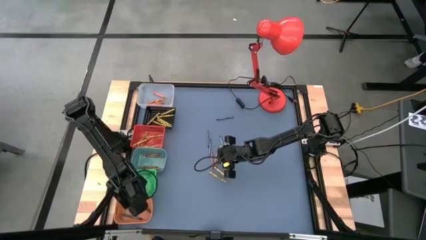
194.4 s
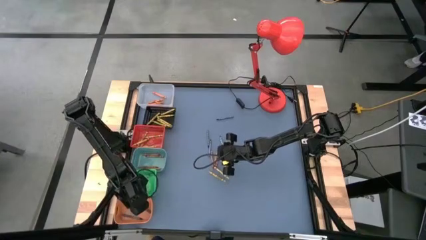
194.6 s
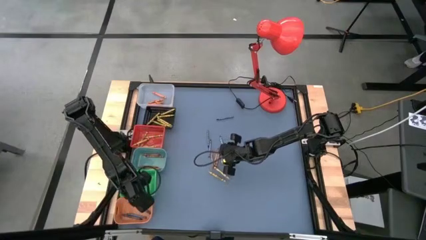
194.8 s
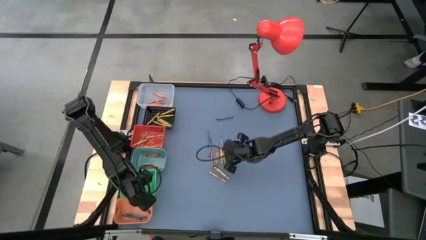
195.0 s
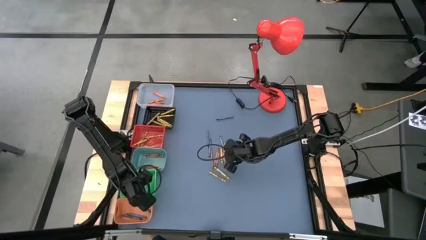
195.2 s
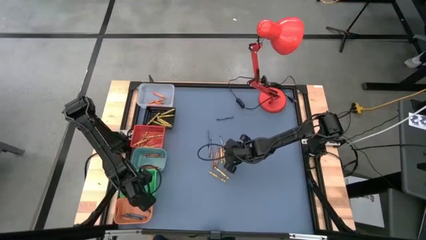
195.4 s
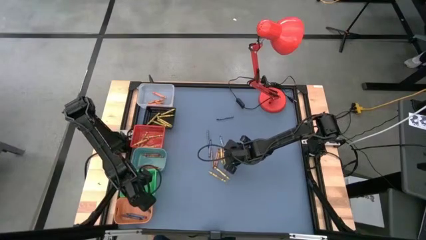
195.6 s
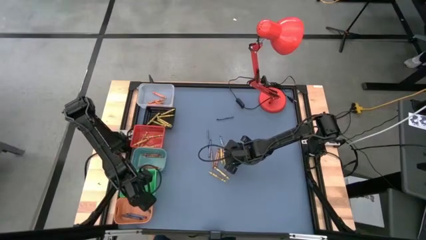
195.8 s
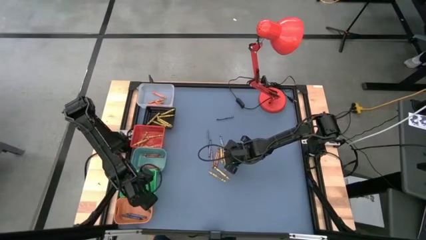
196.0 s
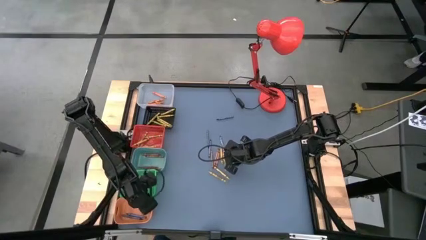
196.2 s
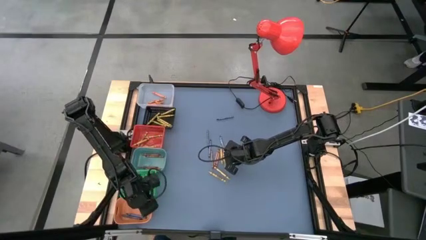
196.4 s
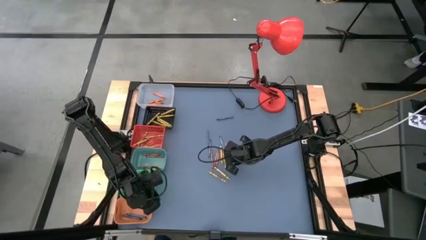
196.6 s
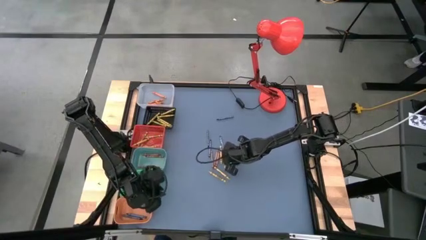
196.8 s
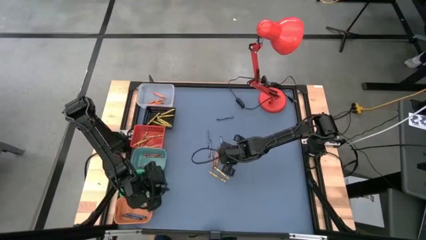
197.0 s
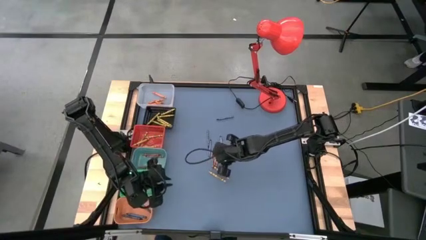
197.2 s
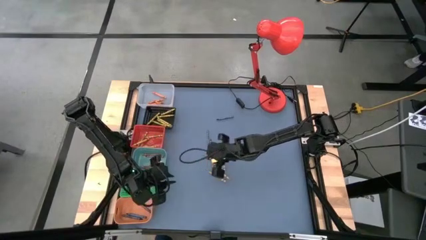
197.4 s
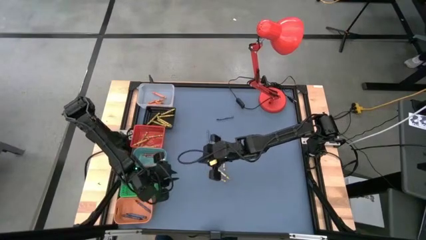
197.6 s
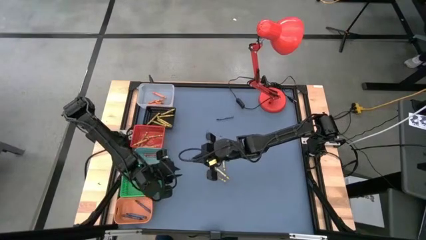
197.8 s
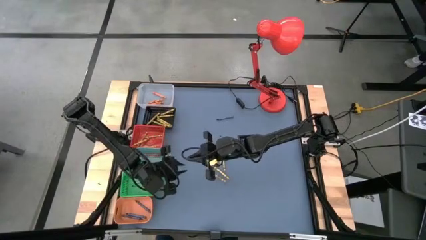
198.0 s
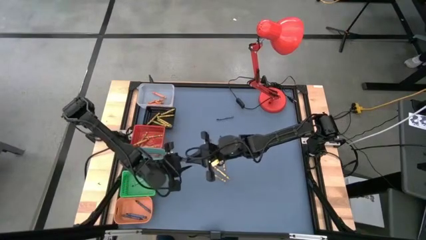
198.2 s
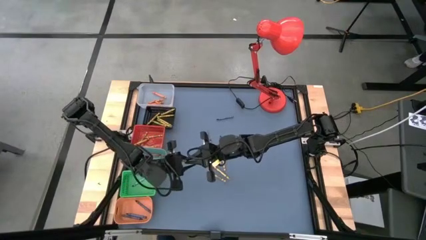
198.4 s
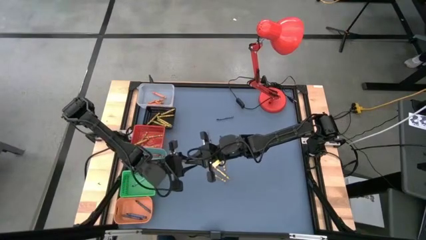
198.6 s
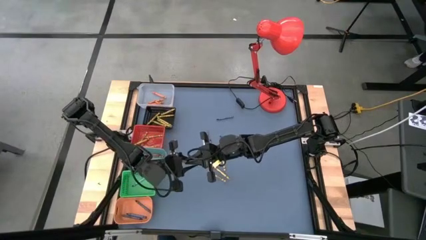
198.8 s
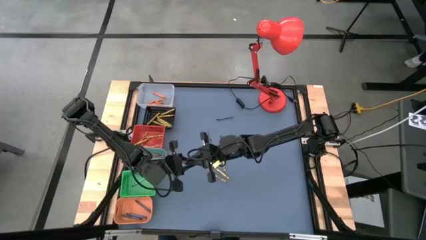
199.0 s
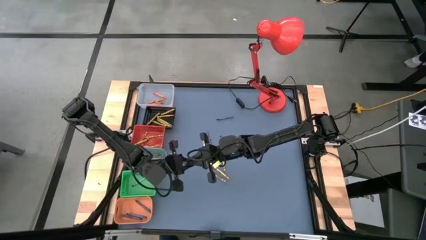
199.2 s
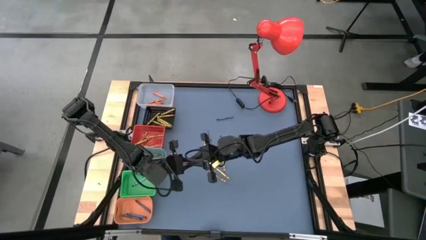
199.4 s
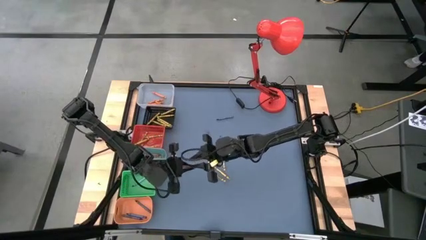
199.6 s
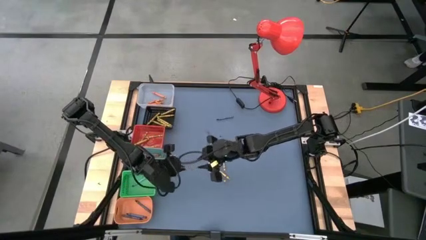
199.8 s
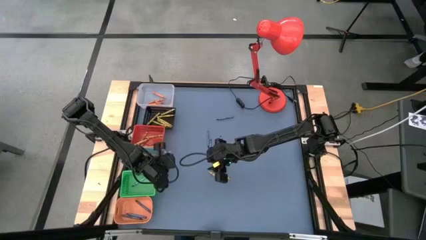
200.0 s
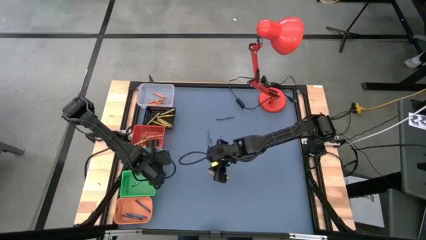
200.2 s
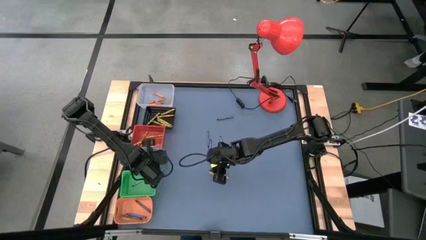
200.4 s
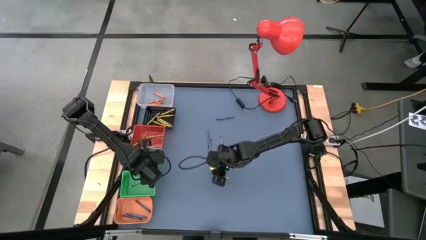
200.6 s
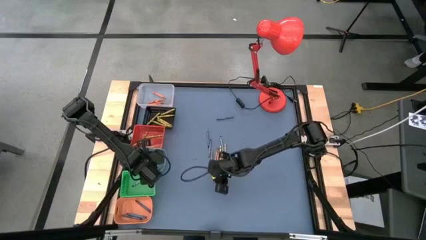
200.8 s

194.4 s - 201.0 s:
Task: Sort crayons
Put the brown crayon into the blue bin

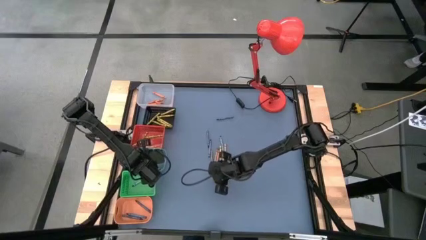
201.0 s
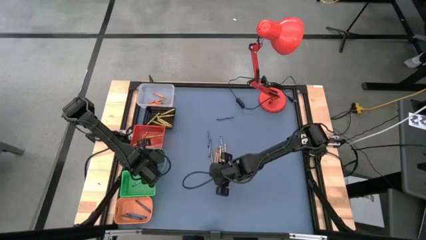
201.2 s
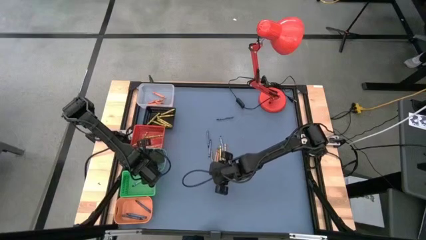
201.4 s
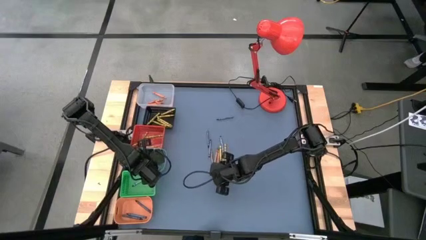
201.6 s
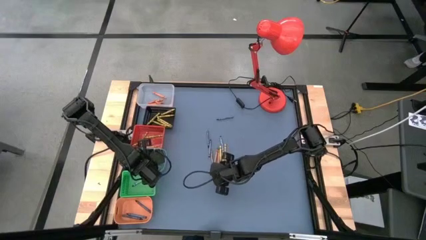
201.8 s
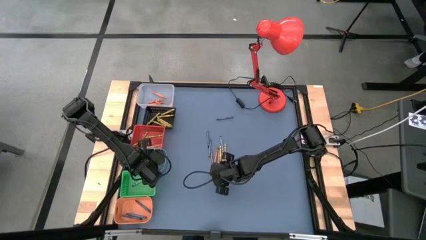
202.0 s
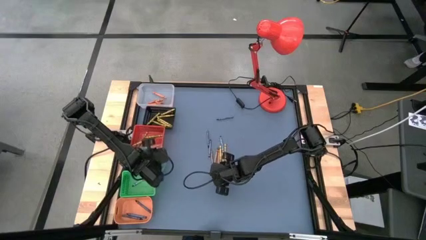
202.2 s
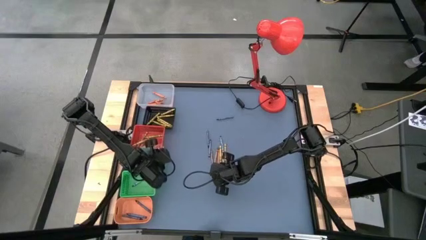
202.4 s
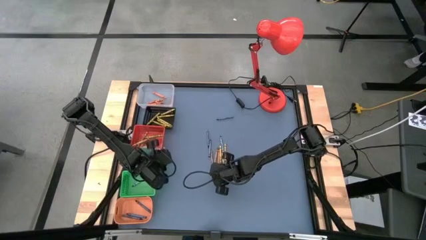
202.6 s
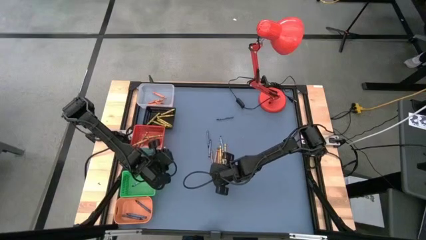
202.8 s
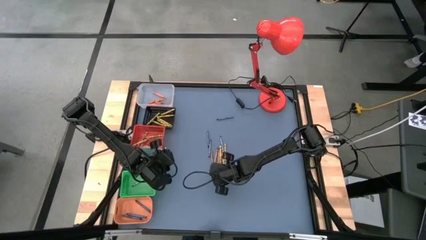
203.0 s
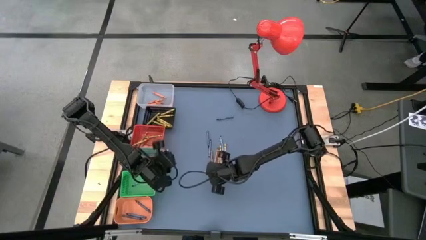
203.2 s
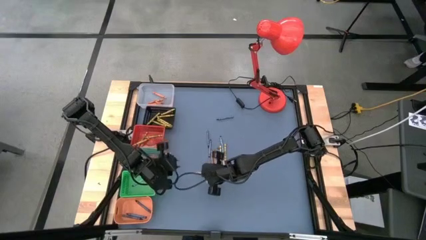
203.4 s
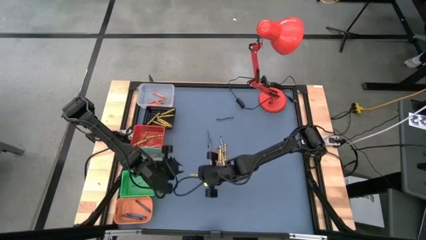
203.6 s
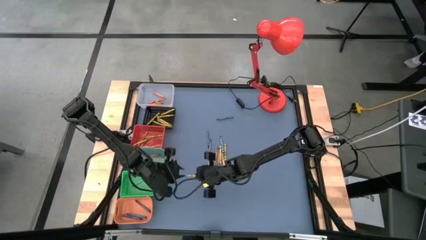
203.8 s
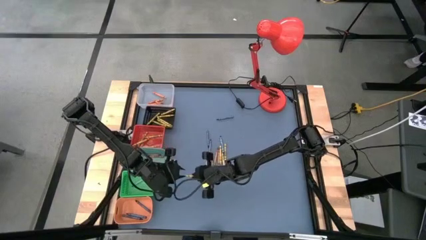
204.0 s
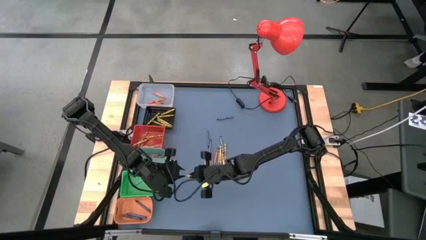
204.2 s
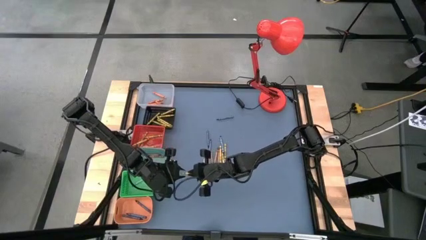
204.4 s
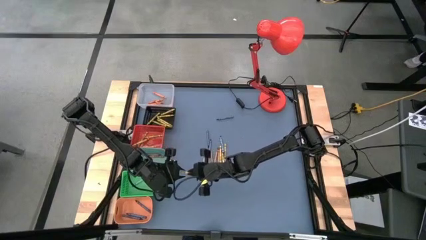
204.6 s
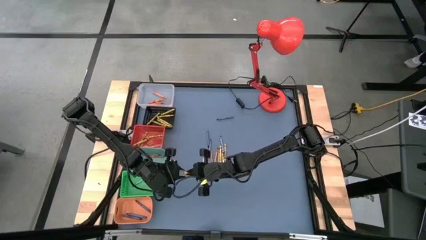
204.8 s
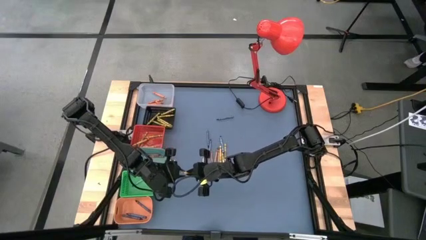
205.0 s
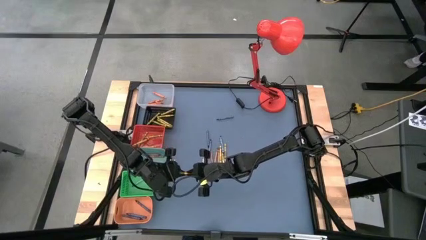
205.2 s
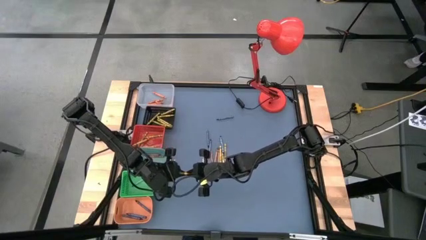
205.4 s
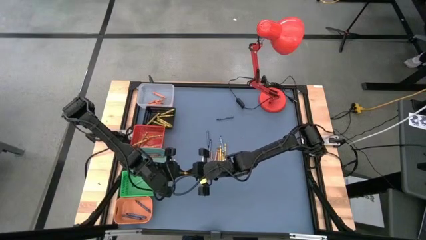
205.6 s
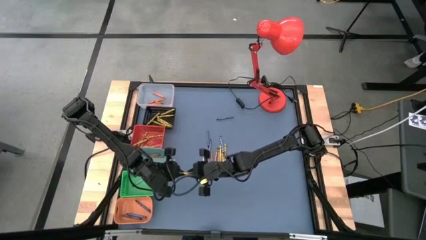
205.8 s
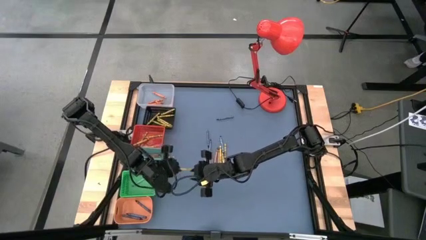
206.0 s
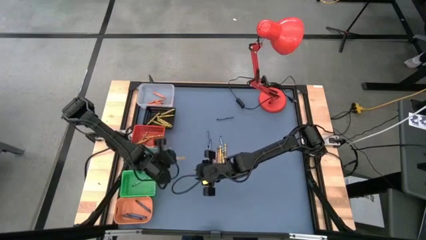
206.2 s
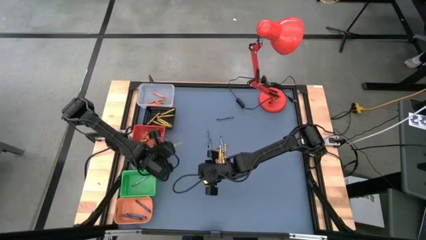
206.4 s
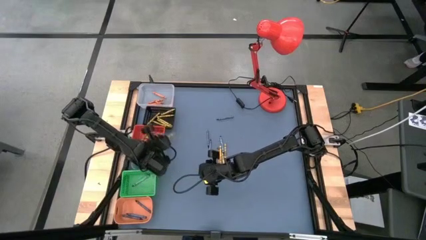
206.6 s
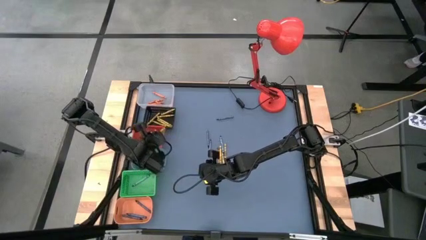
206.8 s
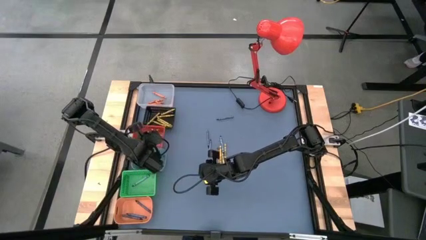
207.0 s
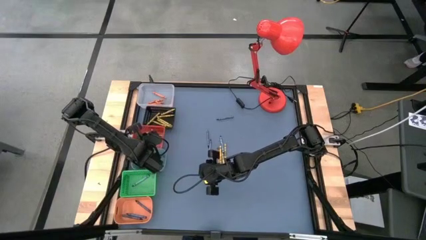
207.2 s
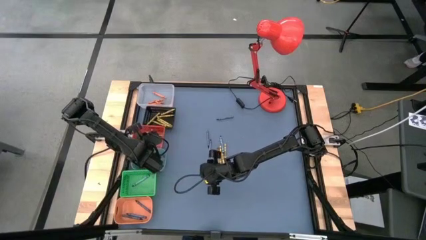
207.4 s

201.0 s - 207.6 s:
Put the yellow crayon into the orange bin

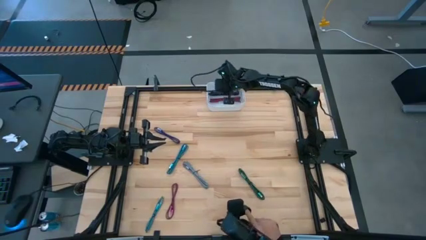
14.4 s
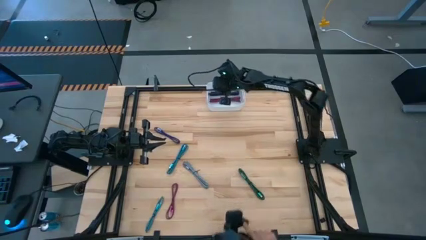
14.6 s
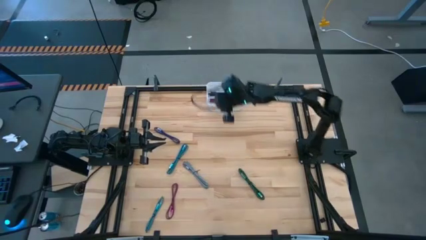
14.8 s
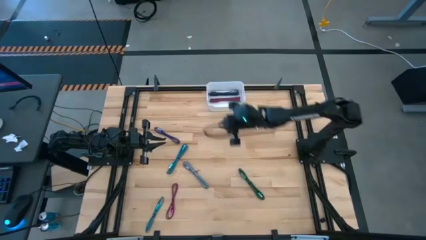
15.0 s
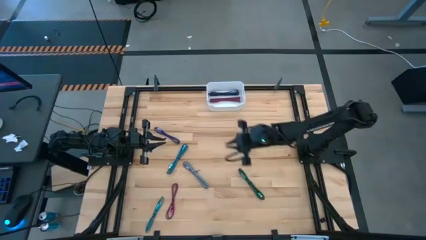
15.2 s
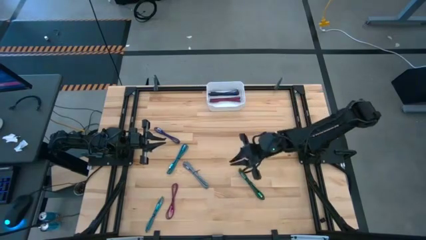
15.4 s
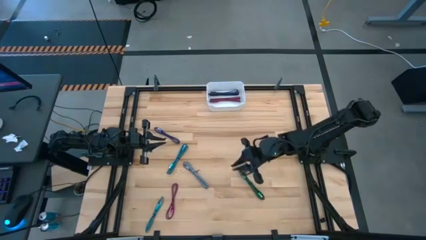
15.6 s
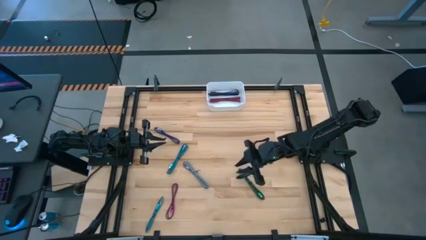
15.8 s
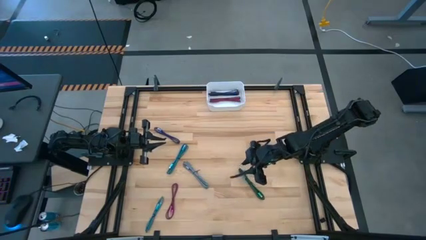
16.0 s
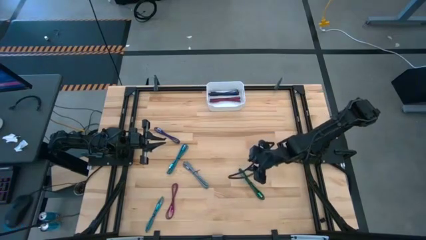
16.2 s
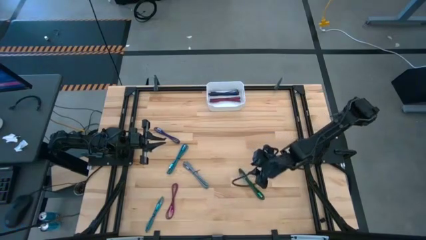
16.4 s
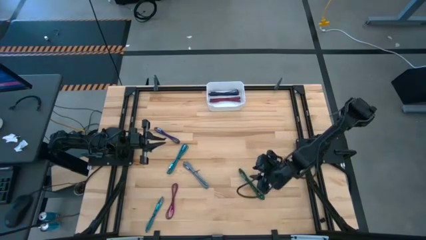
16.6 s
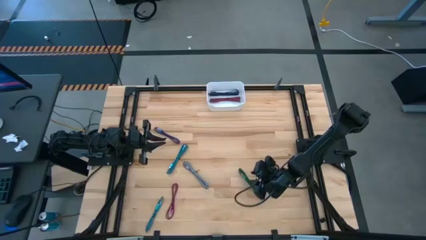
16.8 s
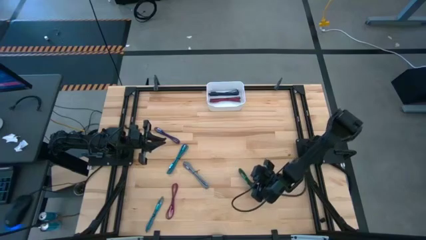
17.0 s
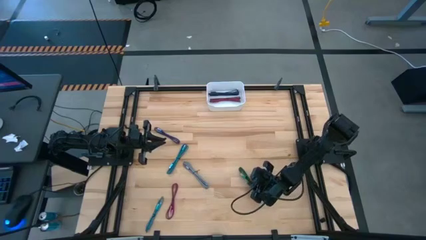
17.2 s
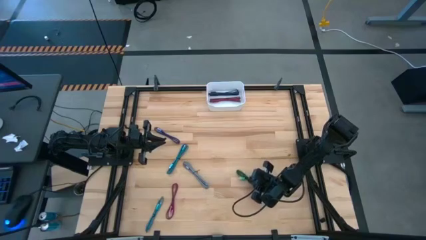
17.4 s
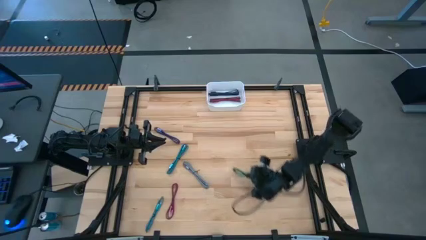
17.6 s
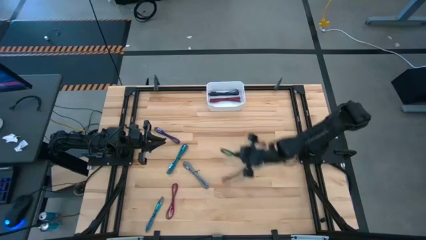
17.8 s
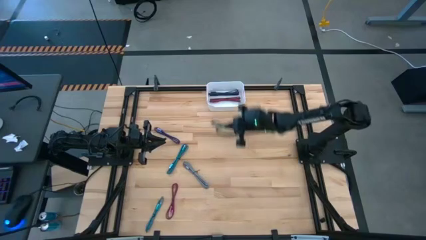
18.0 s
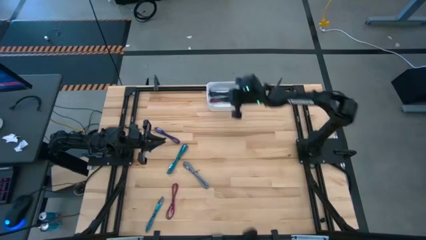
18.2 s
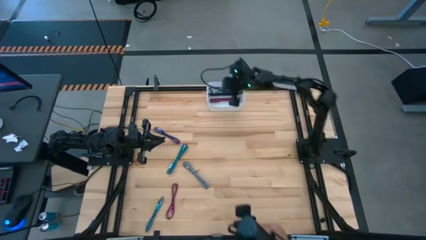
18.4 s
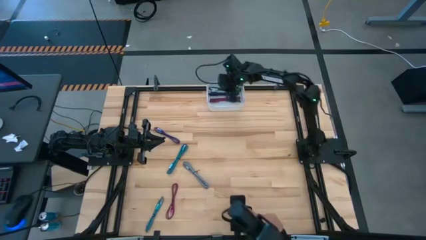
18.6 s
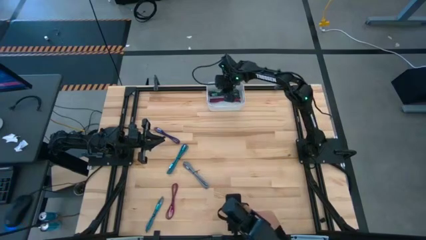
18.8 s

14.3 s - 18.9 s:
Task: Pick and place USB-C Cables
Put the green charger cable into the white bin
